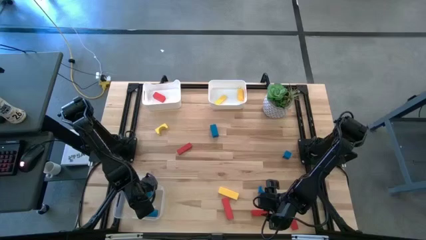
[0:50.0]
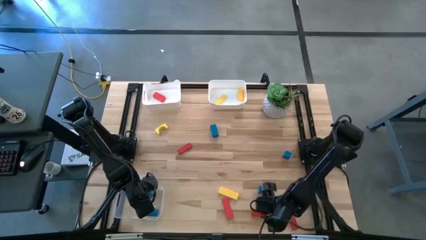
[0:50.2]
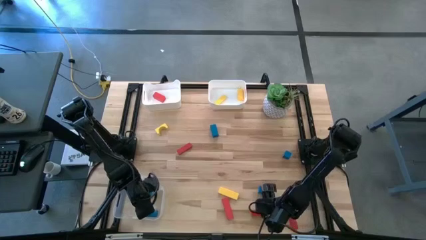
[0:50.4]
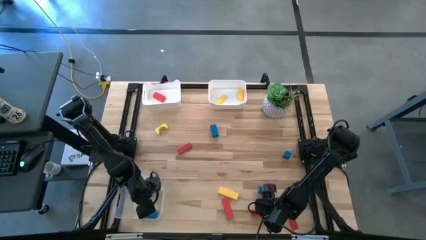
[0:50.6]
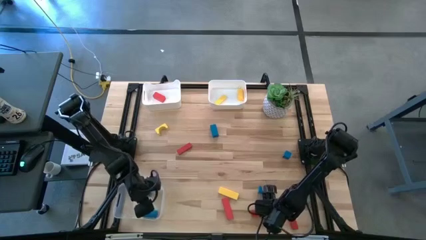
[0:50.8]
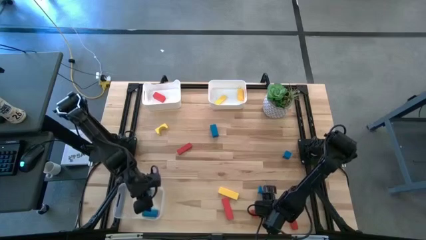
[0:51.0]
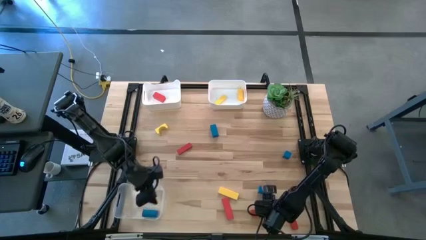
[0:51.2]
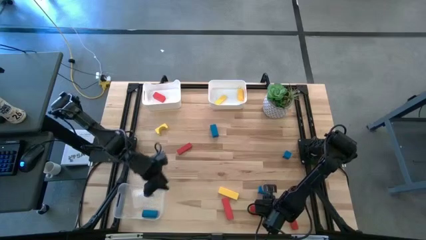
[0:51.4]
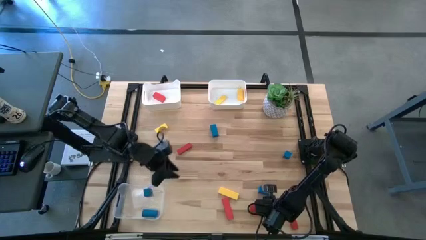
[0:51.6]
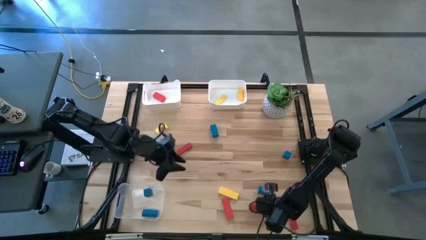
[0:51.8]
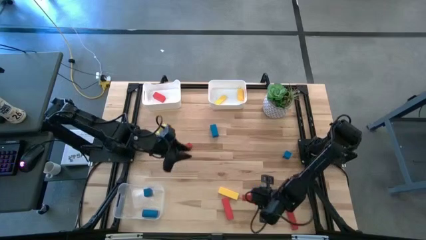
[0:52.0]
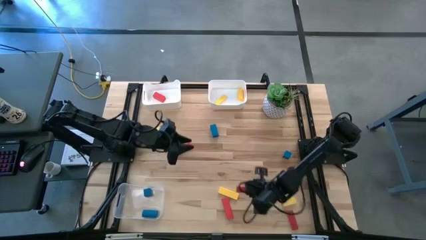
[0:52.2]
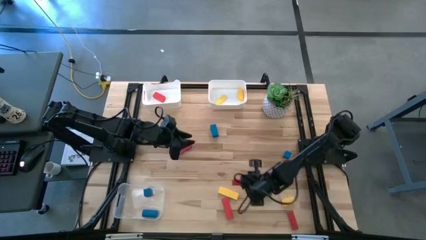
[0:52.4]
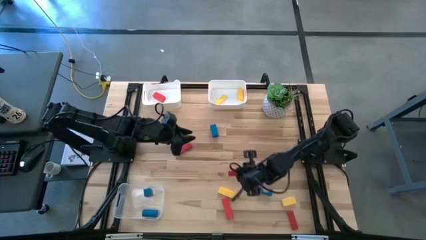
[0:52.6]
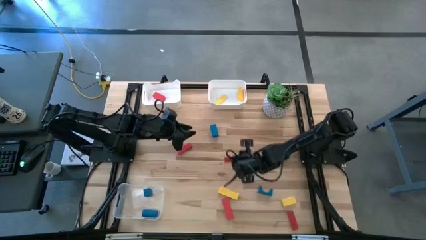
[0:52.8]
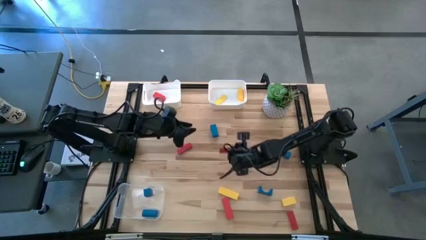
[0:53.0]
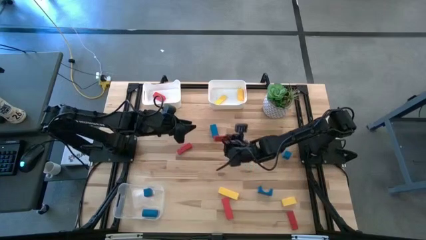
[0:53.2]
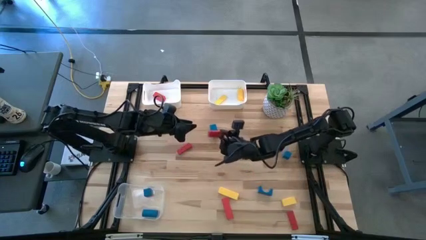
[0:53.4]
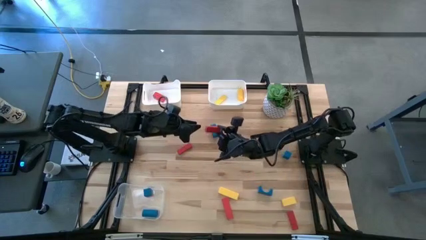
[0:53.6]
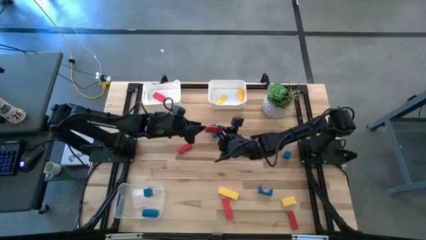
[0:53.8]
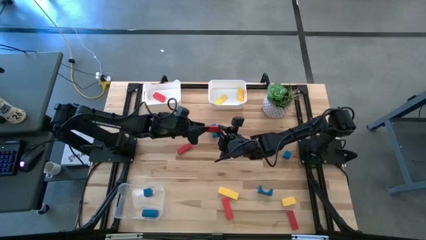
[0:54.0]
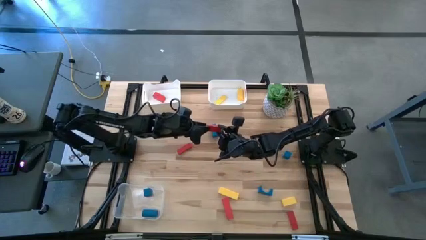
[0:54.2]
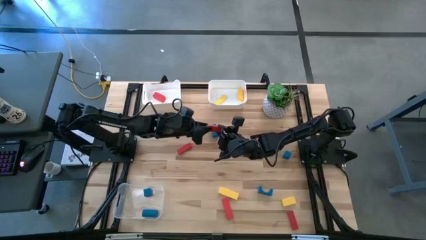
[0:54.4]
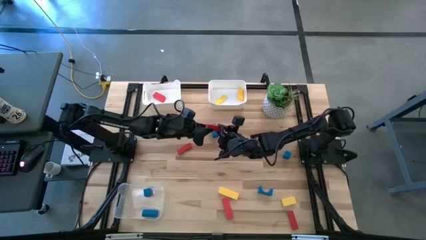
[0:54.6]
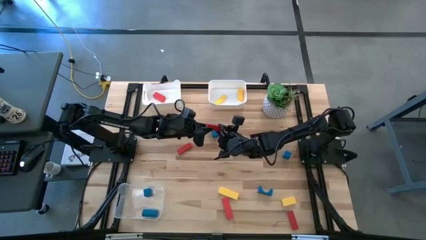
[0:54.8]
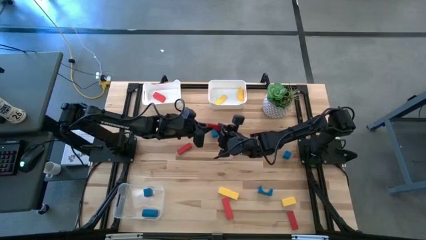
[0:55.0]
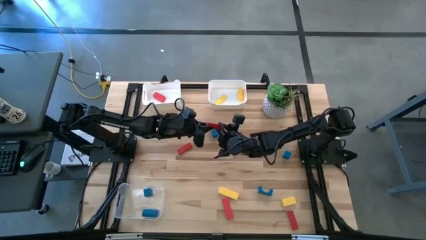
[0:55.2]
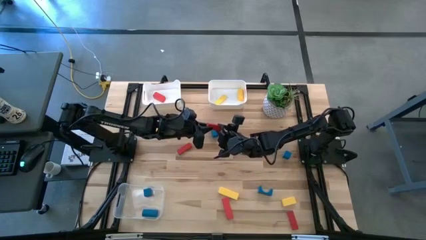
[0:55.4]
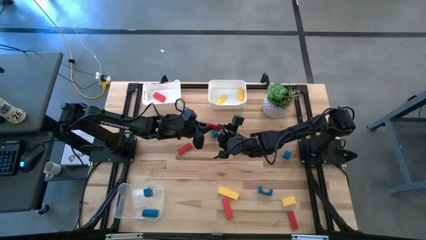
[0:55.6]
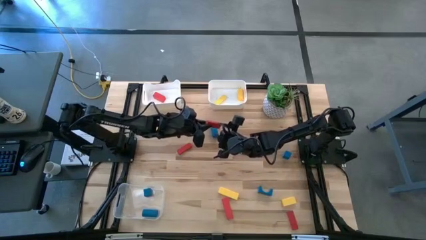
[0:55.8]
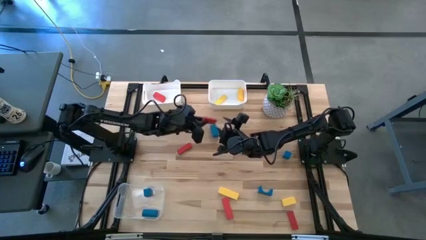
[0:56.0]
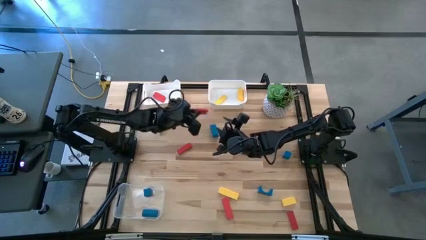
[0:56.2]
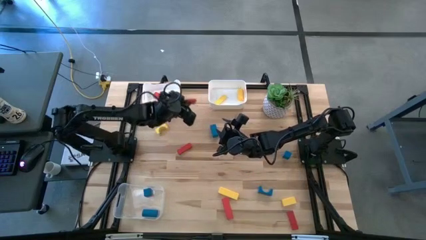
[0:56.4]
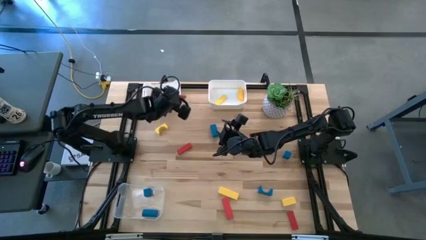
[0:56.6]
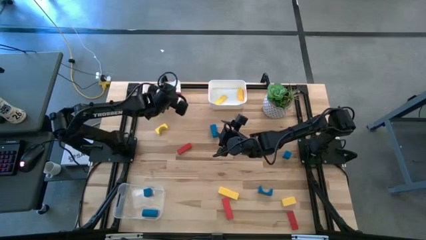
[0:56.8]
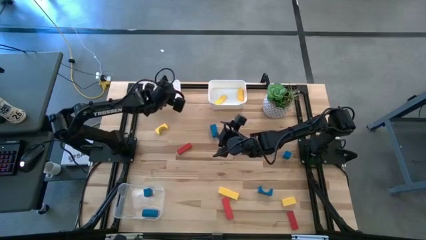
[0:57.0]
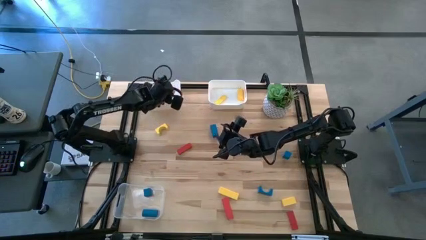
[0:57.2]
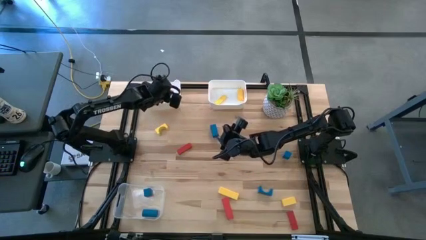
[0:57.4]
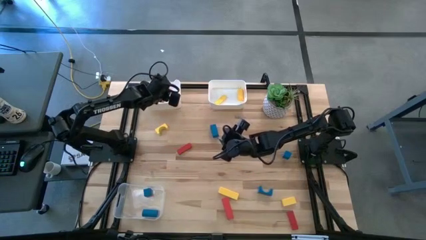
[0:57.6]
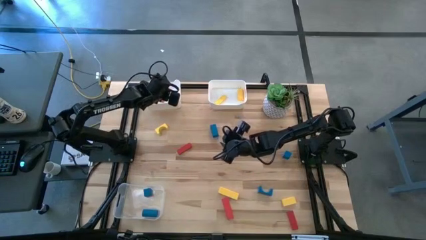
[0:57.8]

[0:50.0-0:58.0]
Task: Sort & place blocks by color
Put the red block into the left white bin

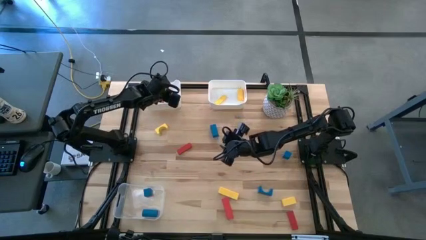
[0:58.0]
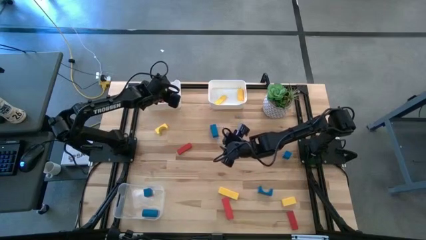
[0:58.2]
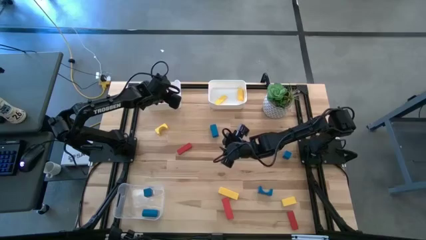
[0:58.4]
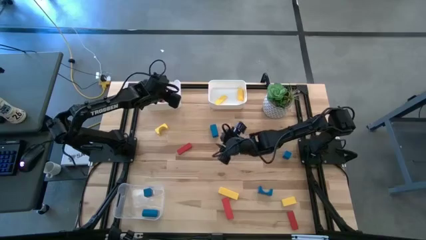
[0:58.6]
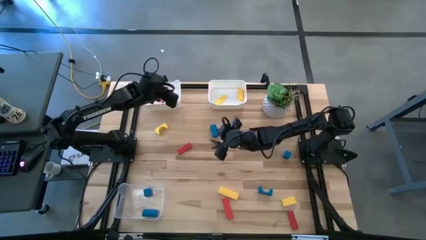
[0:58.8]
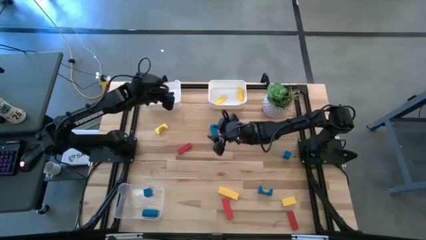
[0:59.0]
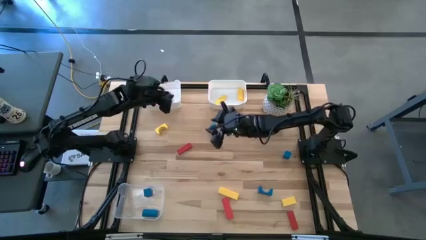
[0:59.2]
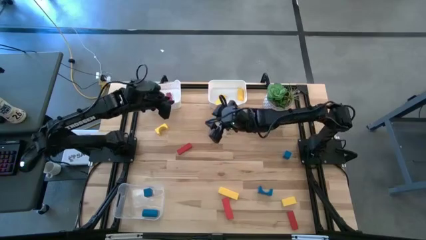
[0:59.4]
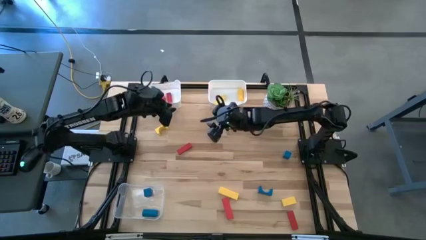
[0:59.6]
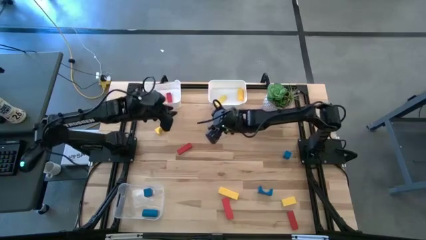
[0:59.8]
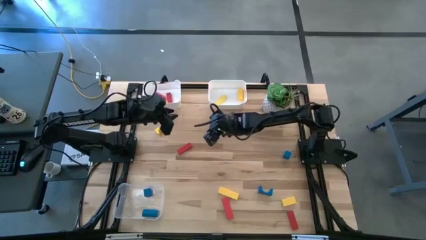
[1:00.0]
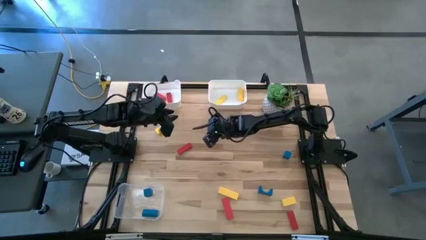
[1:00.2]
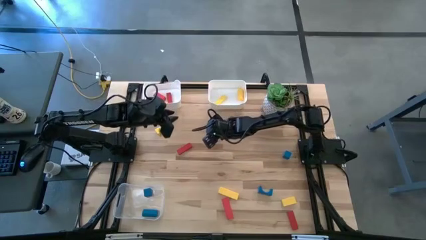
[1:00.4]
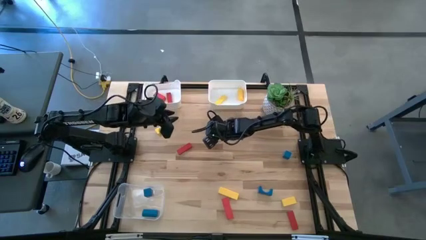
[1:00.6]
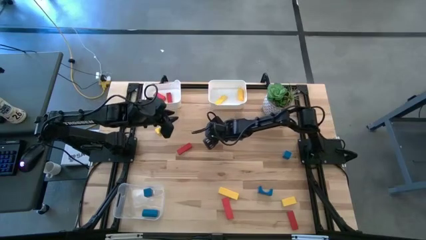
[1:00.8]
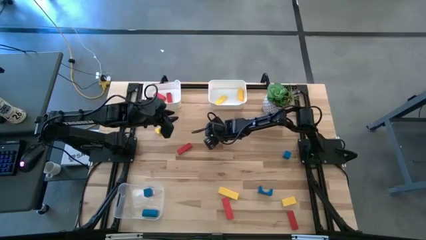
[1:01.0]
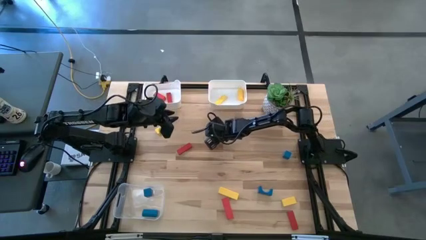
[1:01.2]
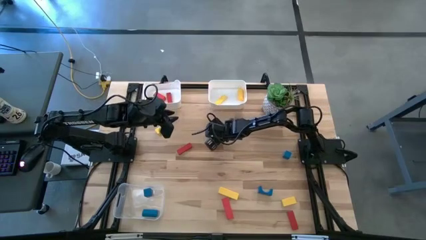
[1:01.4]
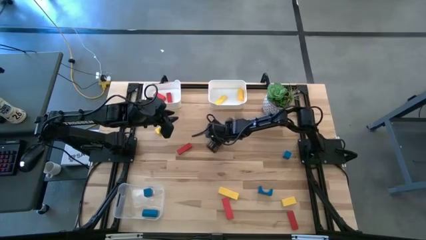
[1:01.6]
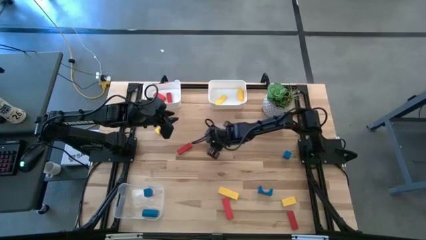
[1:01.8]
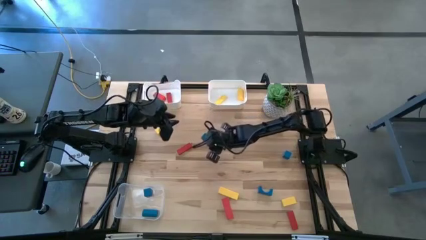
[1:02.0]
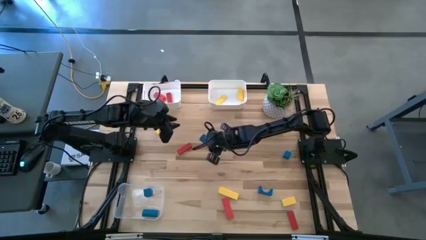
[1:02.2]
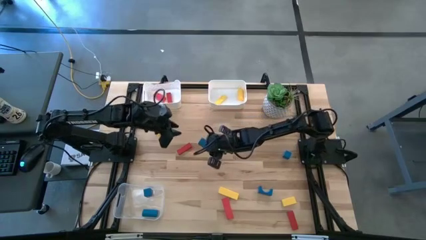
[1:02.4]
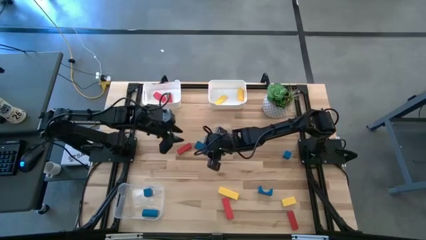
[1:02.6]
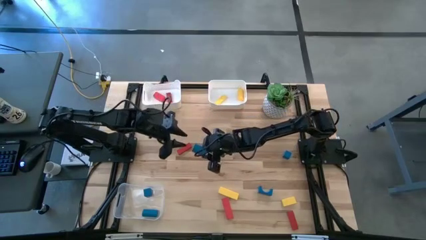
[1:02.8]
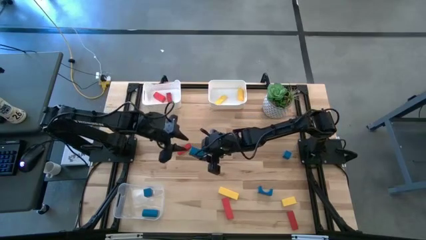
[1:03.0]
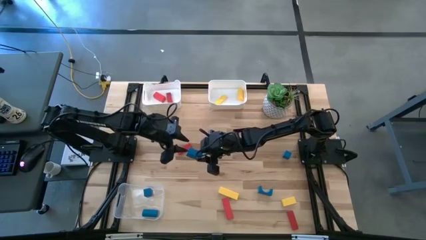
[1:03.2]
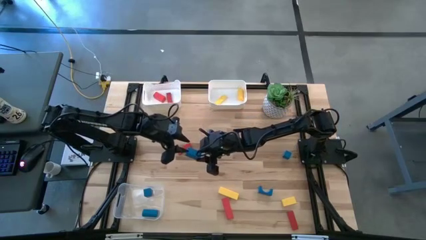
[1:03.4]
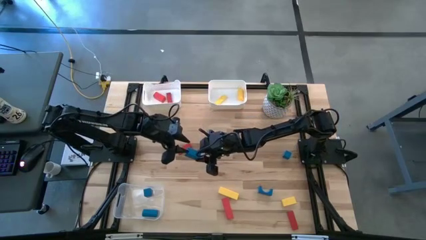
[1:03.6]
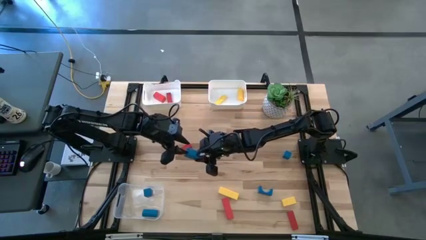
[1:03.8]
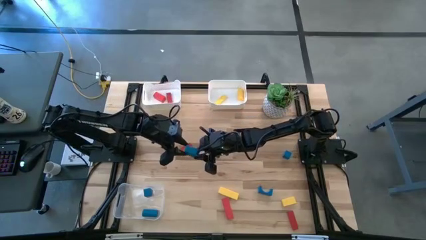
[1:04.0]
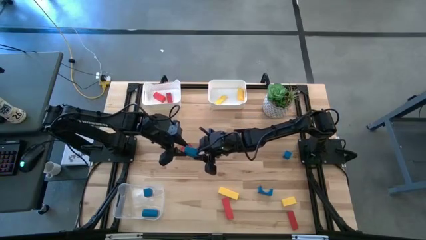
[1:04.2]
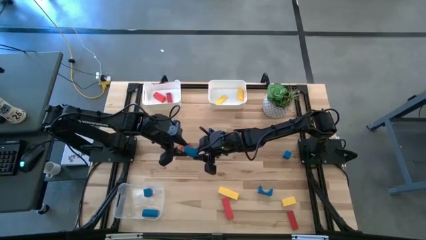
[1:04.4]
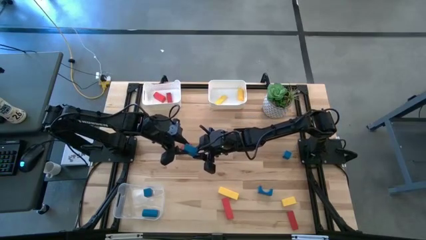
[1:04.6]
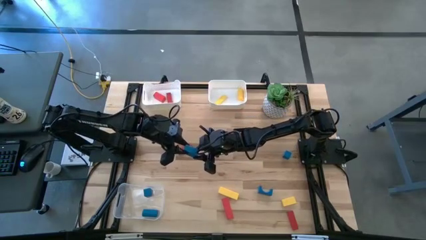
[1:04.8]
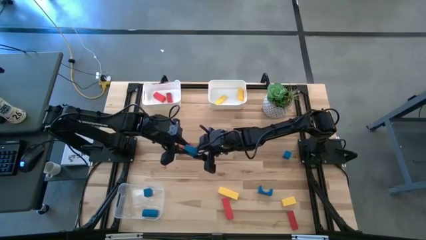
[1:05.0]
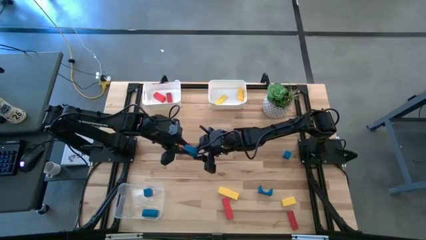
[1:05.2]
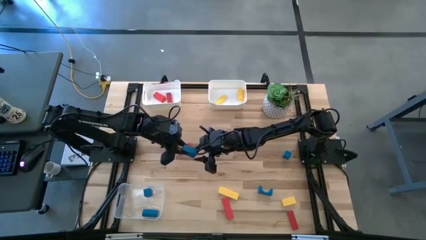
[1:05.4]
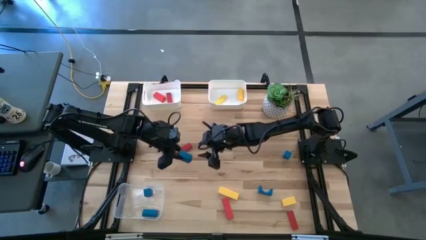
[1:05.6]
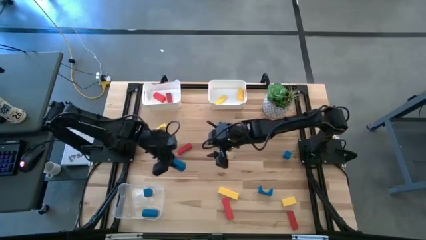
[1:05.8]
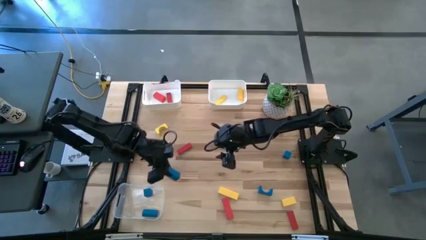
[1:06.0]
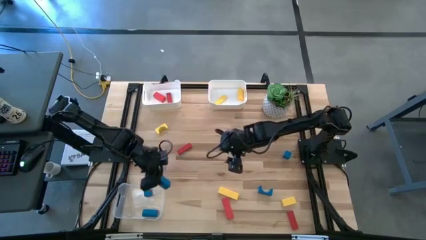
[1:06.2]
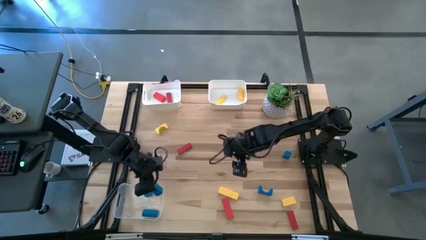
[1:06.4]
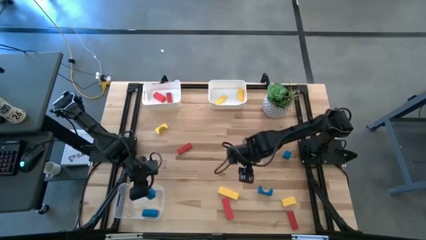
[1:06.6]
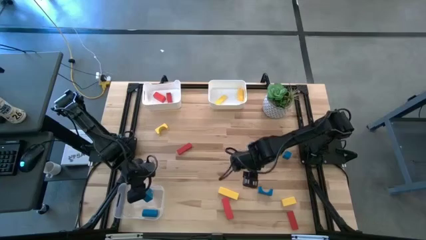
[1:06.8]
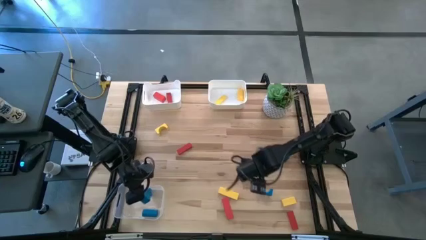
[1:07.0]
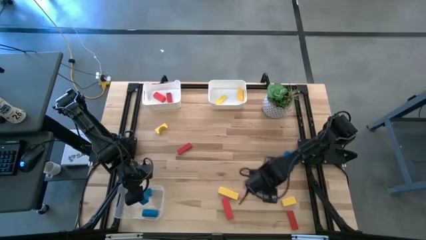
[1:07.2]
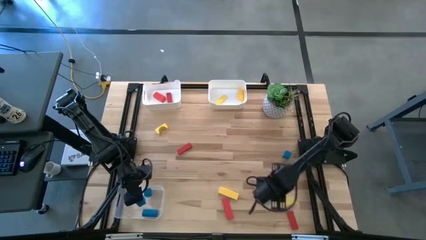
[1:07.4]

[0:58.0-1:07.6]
Put the blue block into the transparent bin
